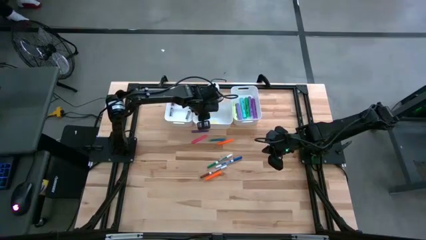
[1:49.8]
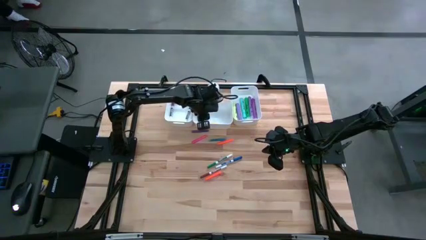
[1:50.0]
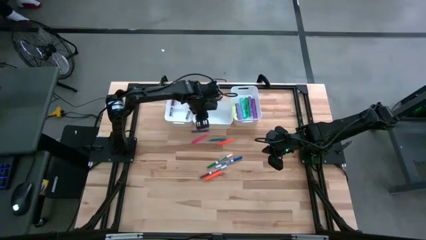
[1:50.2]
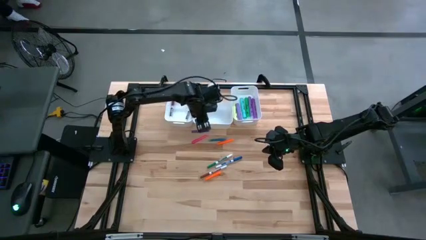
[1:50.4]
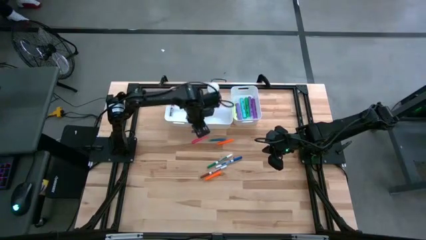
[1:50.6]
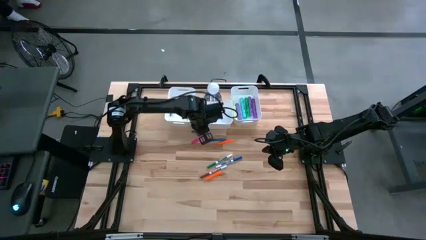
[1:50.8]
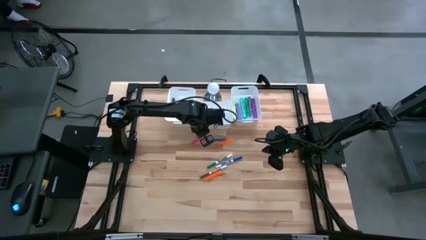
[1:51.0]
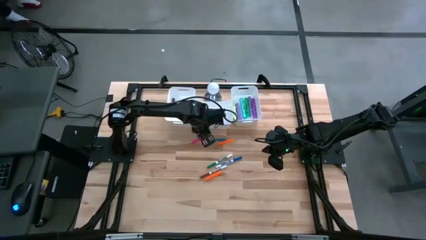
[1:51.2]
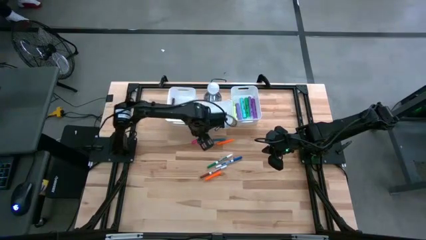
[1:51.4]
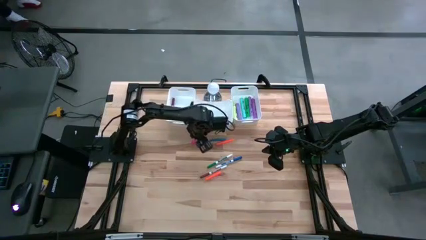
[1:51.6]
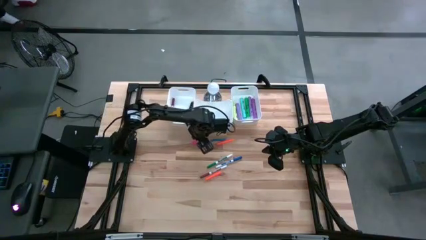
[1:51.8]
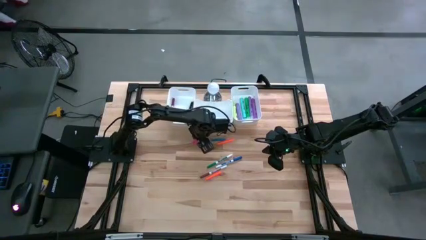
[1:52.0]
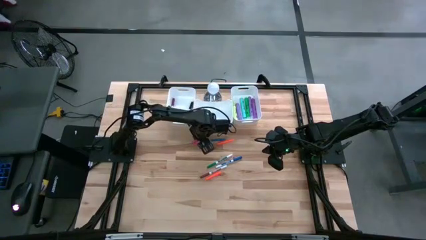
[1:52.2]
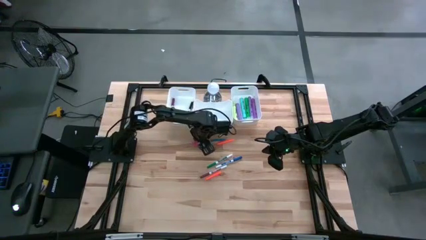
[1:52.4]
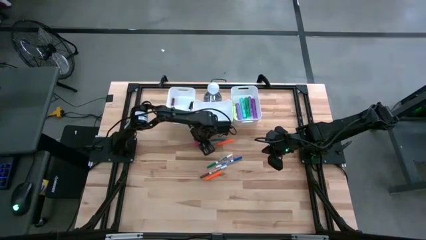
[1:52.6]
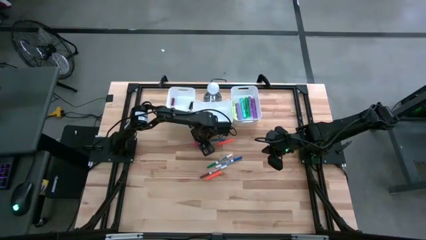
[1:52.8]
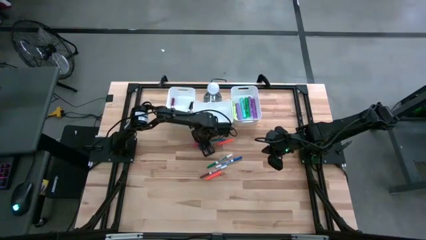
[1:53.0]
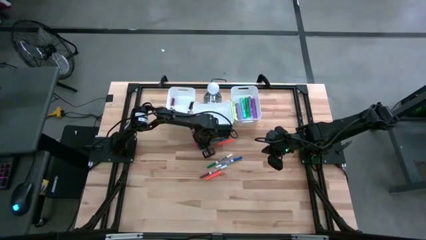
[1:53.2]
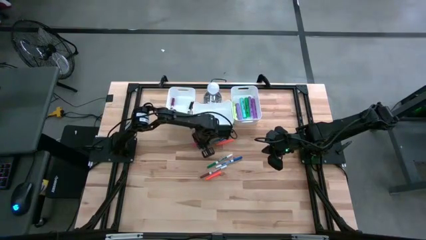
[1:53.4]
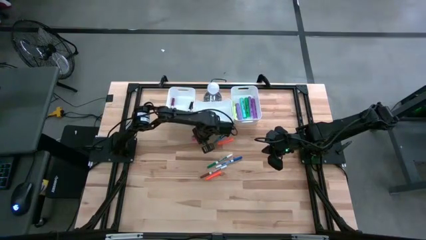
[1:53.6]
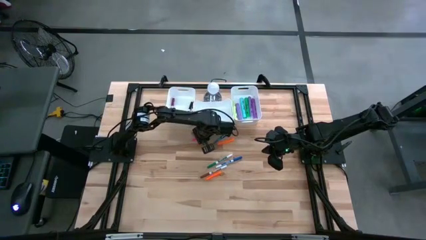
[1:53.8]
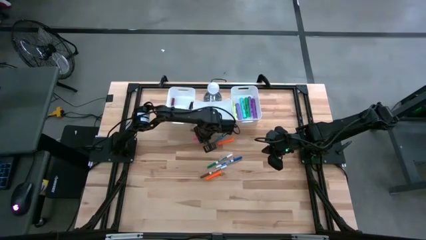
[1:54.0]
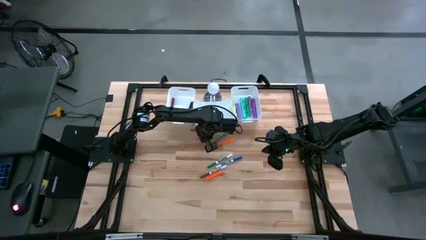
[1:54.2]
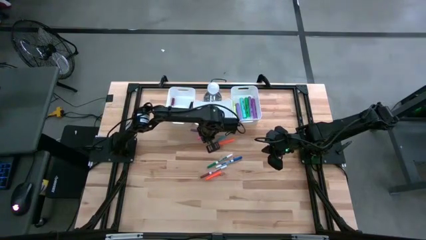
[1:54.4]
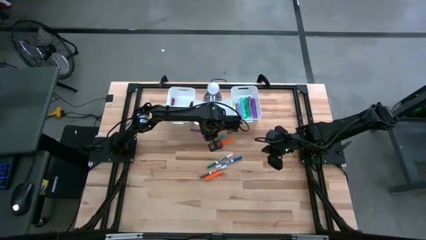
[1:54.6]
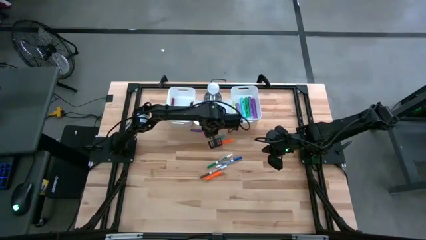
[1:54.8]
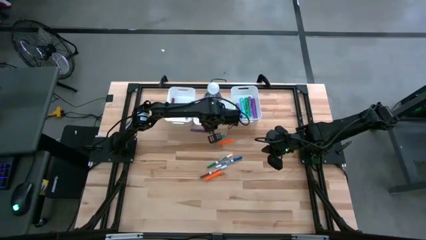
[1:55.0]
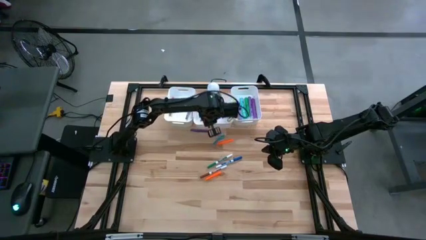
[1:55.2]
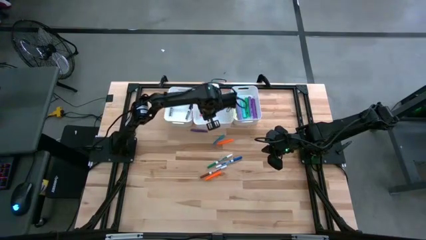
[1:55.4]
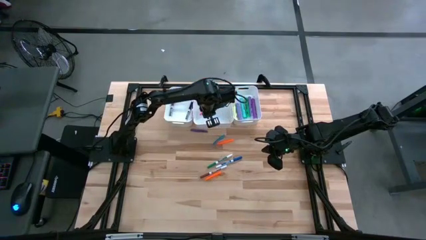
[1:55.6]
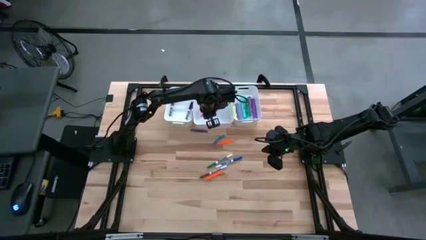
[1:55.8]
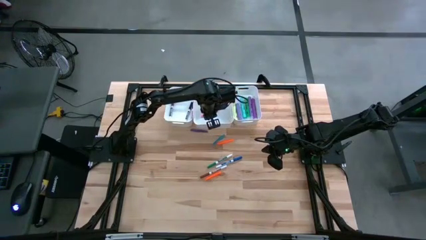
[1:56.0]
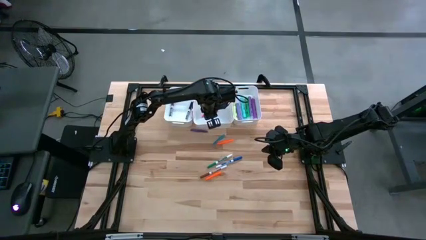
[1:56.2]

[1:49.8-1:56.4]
Task: Pick & Place Markers
Put the pink pen into the middle white bin

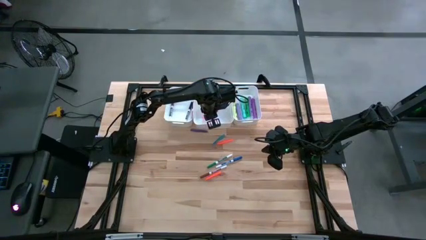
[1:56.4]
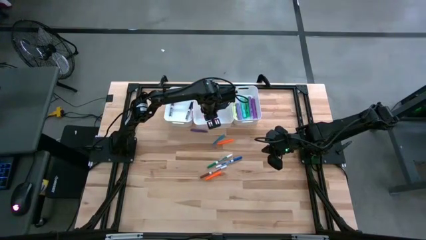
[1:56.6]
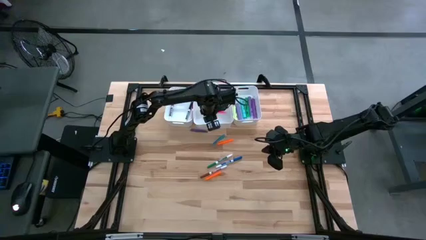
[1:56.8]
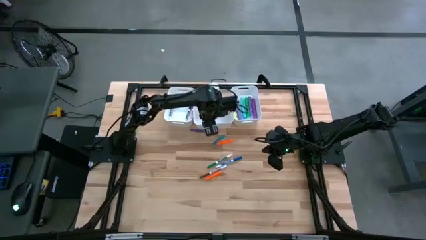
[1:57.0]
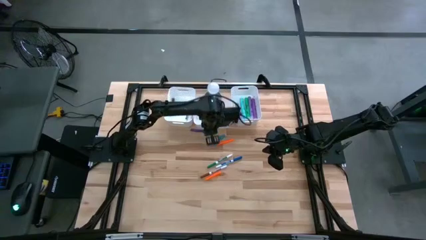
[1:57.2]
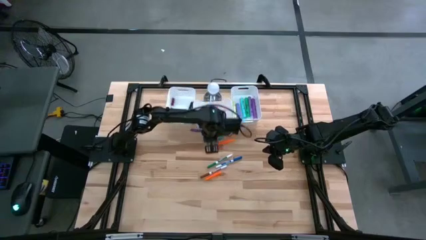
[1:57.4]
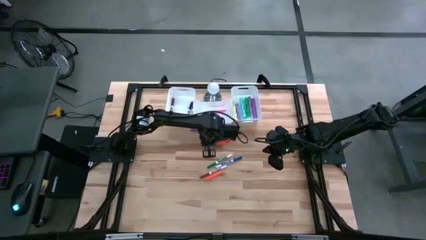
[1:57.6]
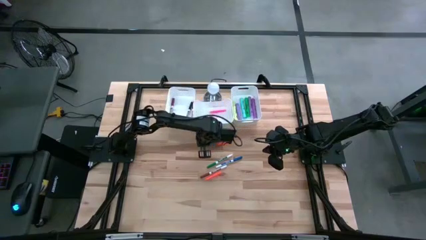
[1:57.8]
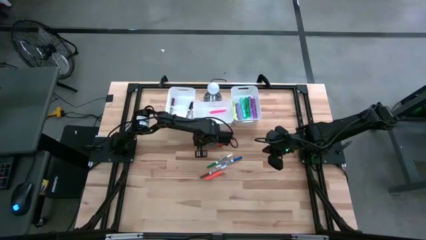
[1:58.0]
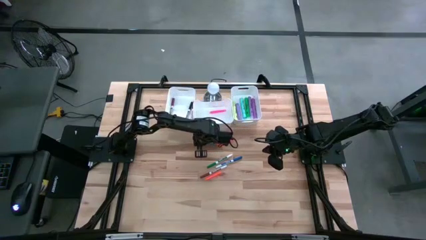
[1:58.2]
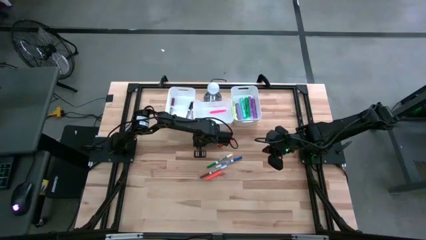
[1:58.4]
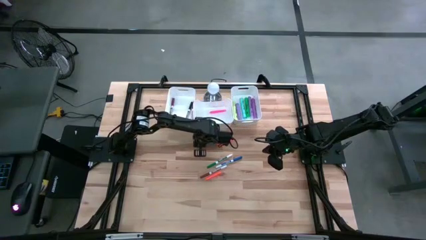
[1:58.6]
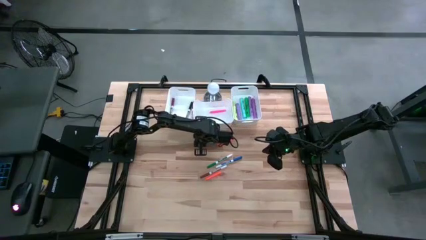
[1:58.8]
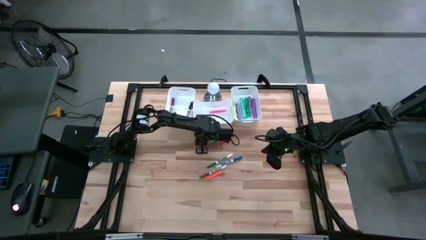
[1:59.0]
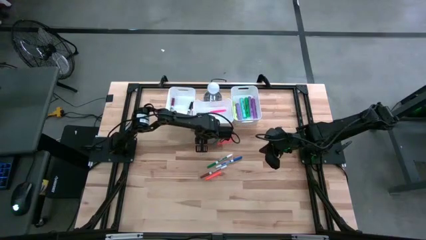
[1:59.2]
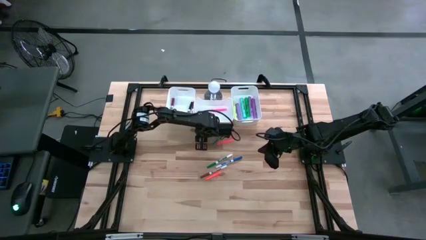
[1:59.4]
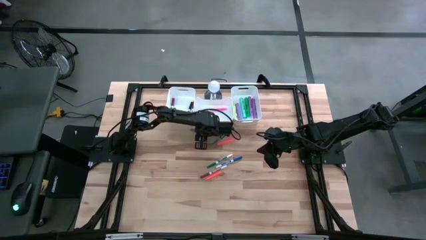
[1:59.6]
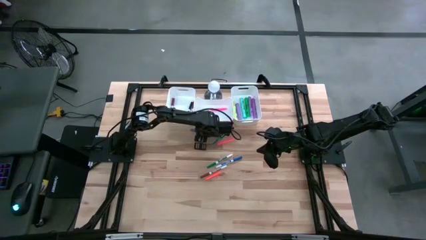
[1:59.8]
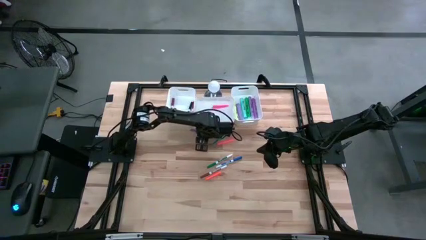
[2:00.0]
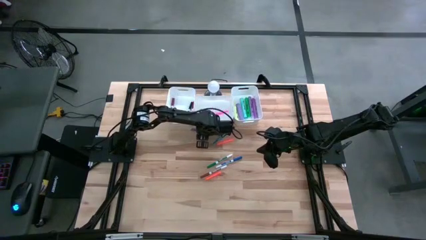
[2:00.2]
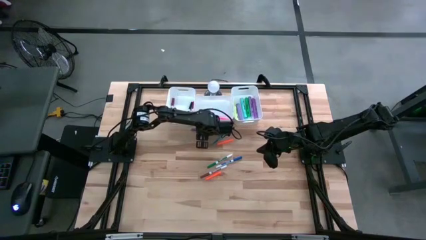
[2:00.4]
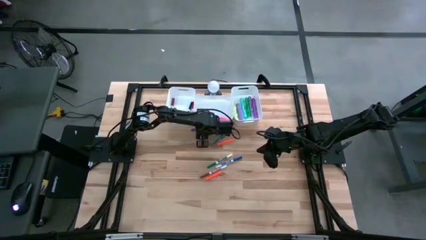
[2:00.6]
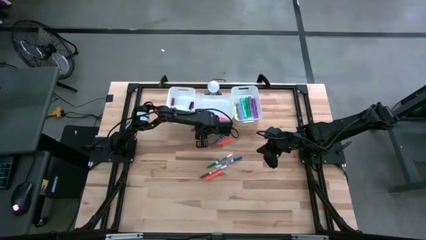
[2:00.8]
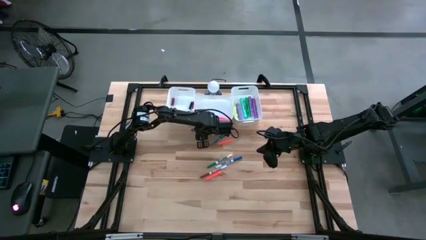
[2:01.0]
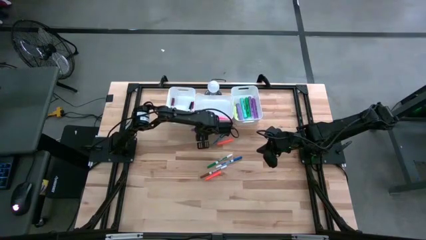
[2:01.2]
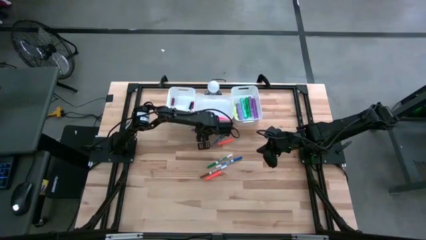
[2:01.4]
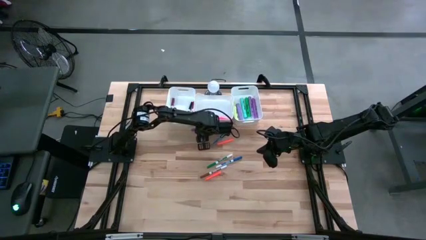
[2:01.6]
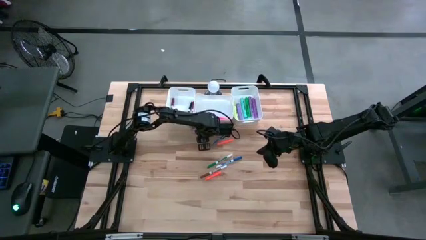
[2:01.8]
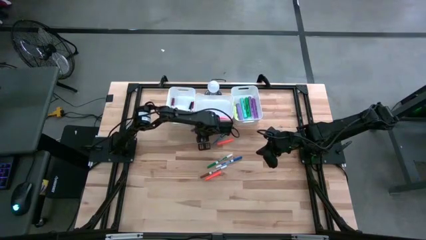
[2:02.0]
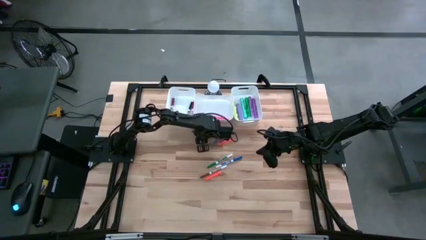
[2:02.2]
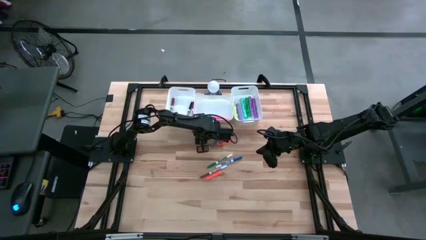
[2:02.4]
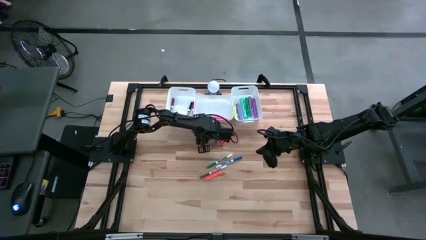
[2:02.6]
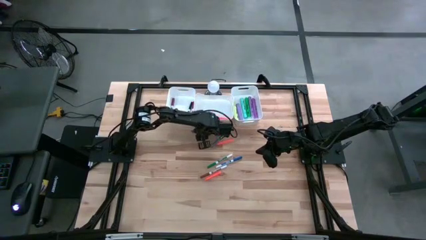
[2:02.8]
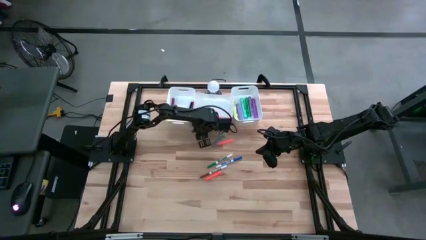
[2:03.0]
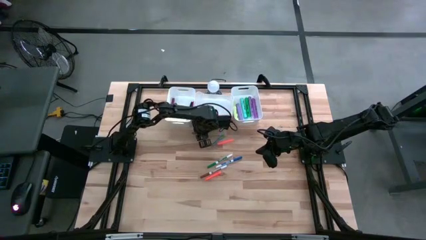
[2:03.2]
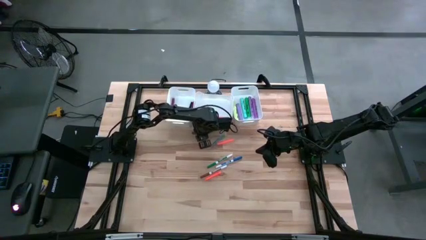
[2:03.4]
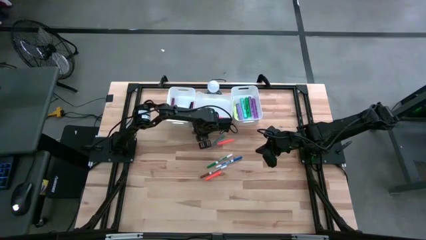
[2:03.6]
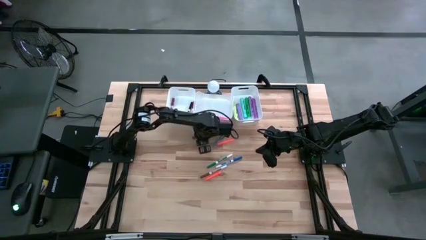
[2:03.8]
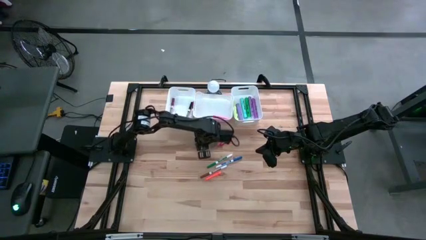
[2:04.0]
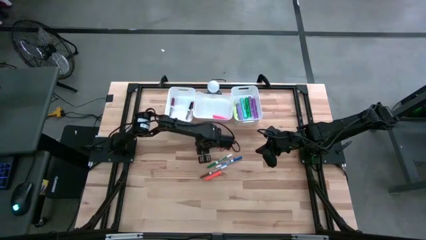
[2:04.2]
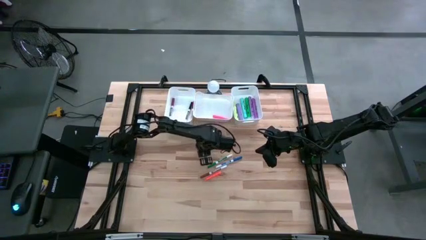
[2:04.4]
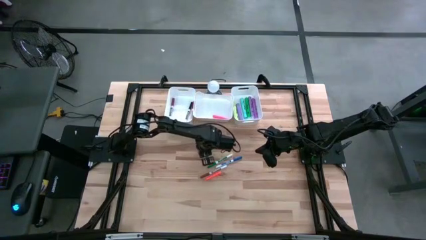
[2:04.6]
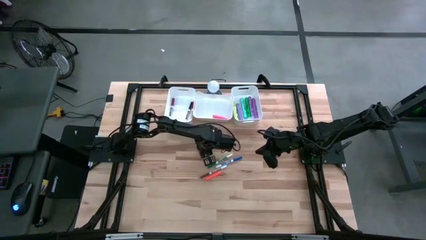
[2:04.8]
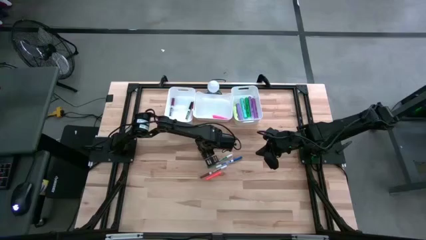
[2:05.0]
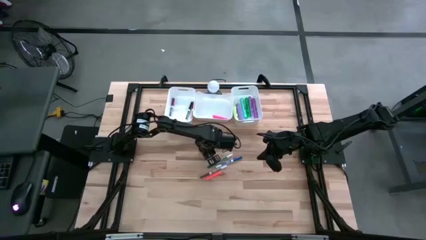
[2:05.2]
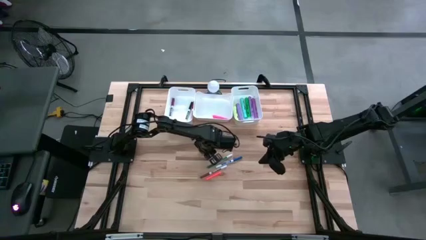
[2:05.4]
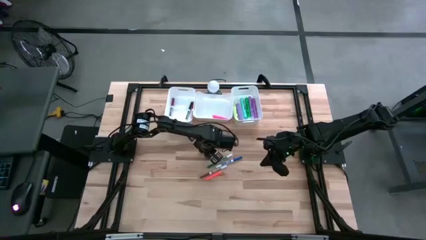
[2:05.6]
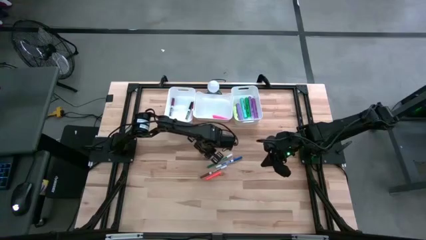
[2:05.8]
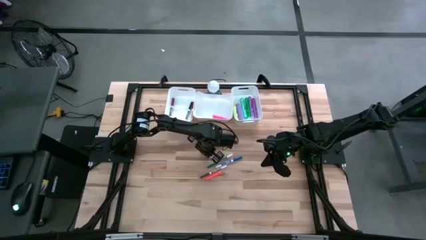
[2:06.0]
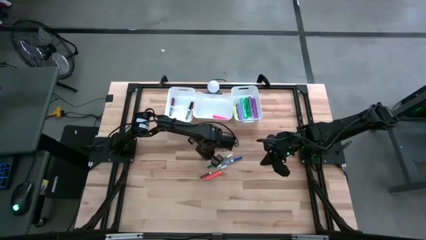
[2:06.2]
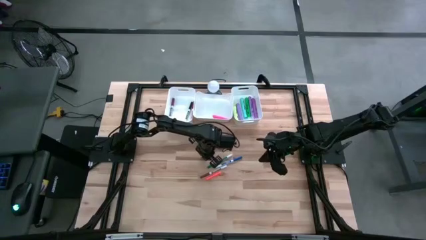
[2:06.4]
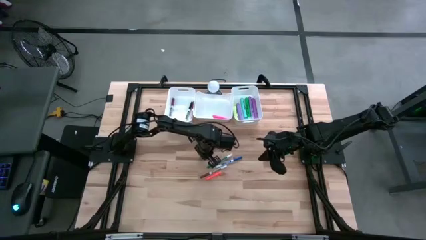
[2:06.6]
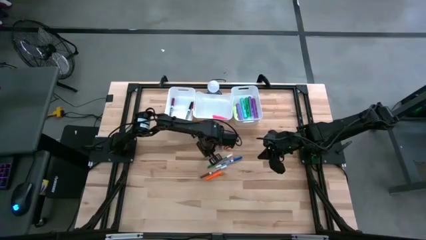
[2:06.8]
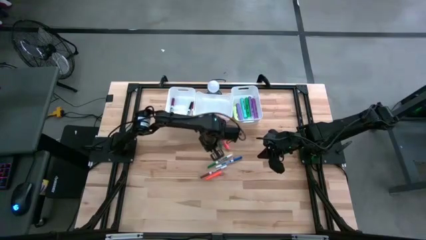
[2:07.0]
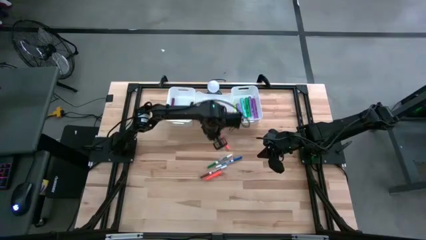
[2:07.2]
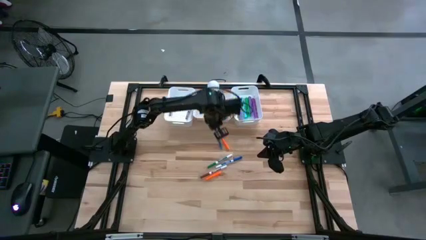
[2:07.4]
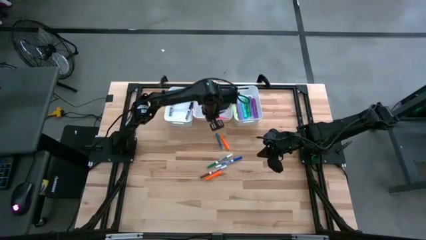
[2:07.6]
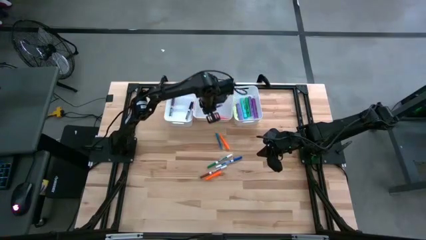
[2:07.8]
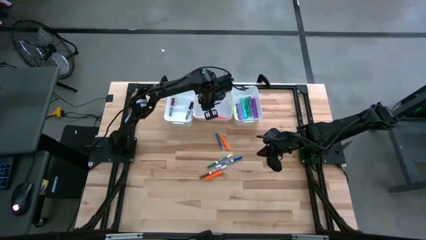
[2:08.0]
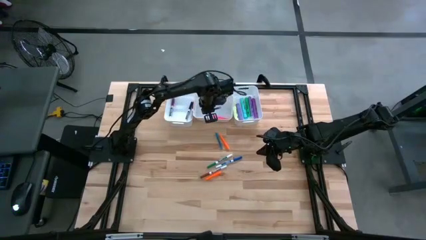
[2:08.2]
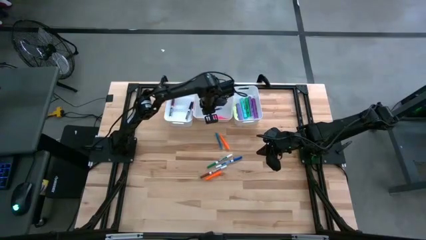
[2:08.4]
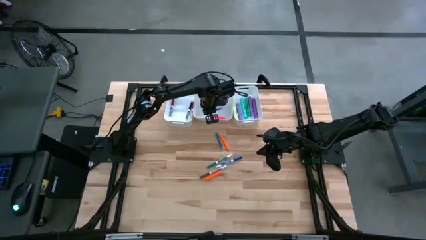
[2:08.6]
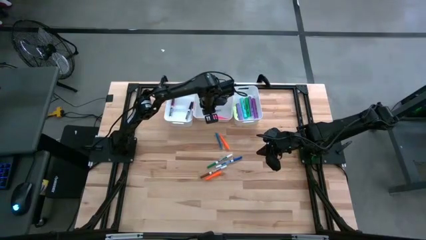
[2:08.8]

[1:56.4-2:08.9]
Put the purple pen into the middle white bin
